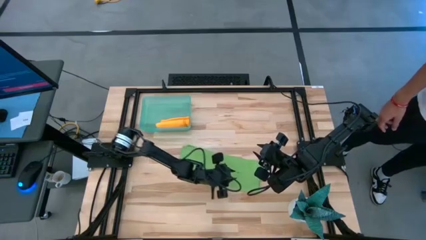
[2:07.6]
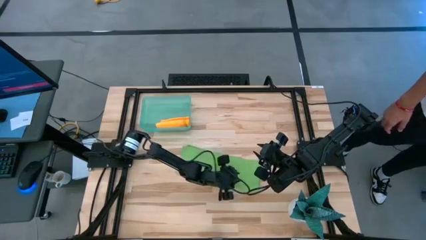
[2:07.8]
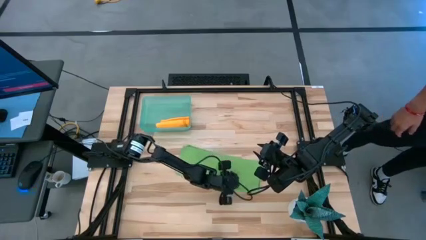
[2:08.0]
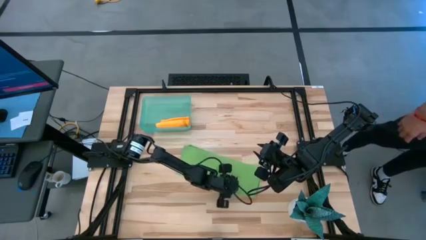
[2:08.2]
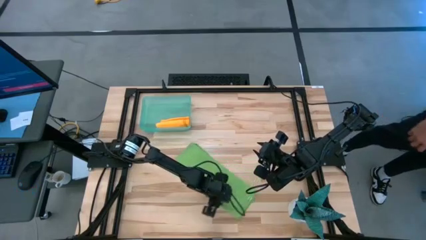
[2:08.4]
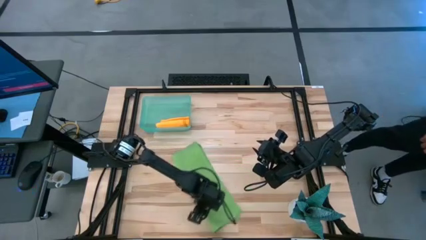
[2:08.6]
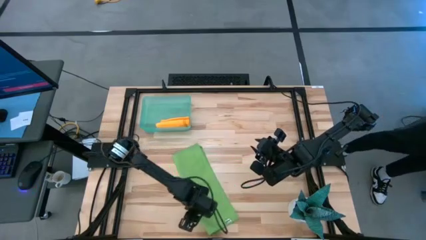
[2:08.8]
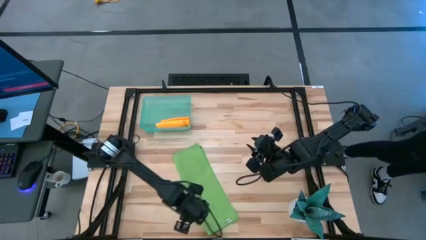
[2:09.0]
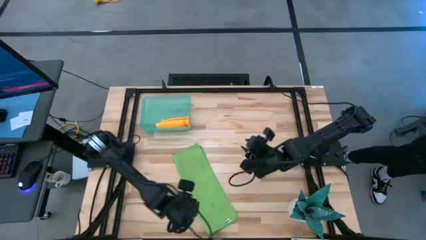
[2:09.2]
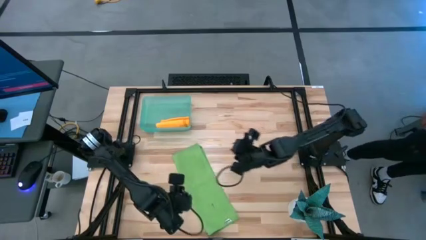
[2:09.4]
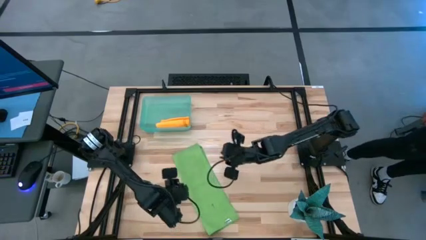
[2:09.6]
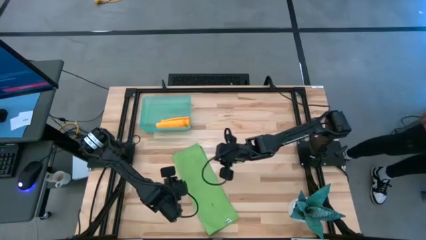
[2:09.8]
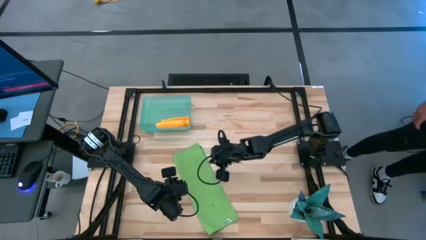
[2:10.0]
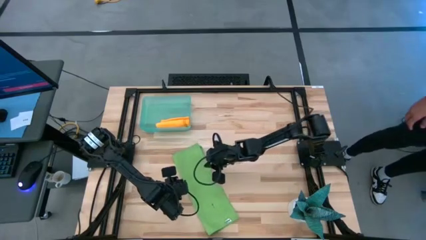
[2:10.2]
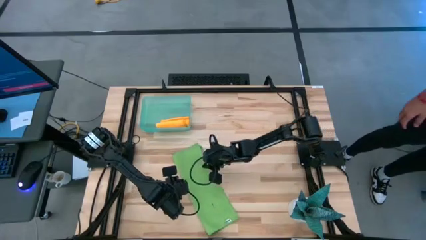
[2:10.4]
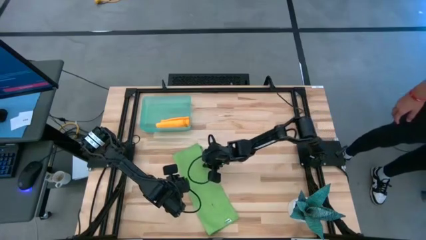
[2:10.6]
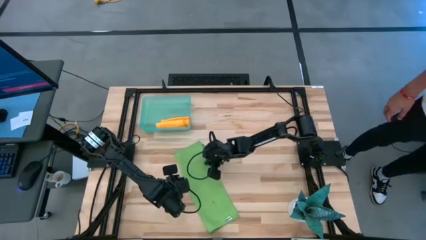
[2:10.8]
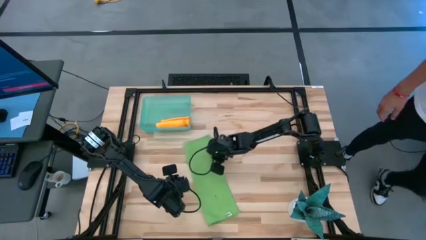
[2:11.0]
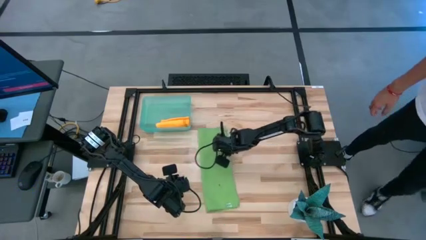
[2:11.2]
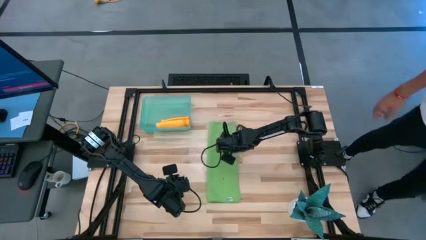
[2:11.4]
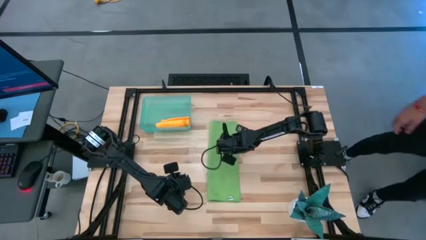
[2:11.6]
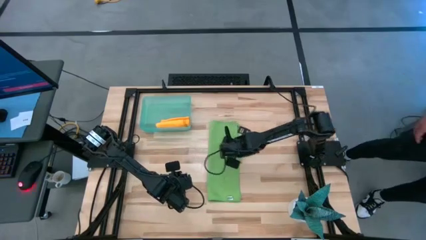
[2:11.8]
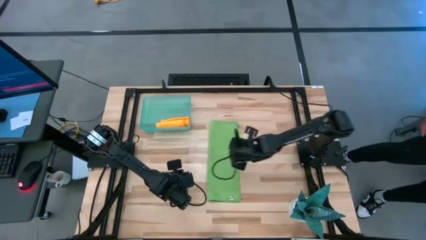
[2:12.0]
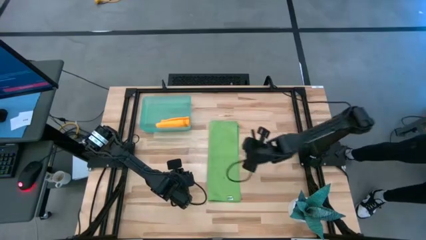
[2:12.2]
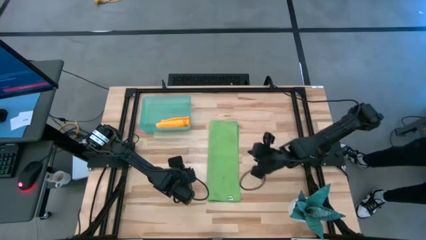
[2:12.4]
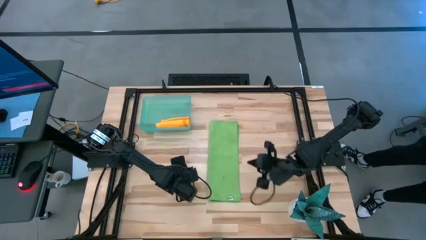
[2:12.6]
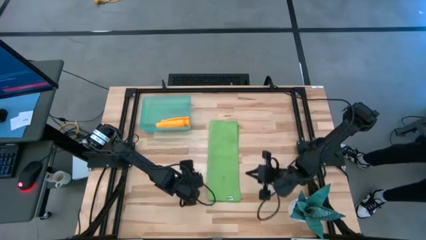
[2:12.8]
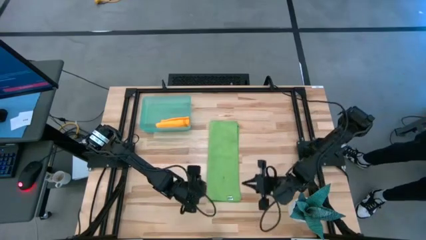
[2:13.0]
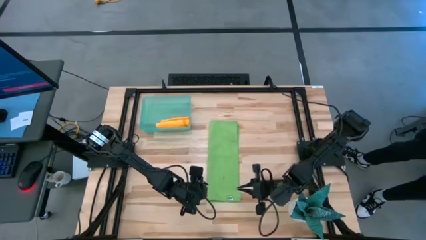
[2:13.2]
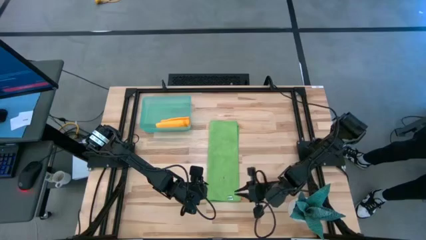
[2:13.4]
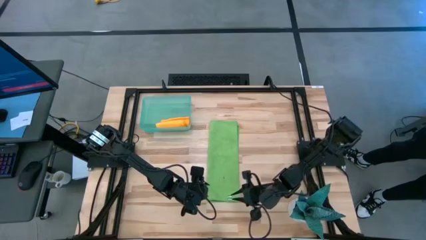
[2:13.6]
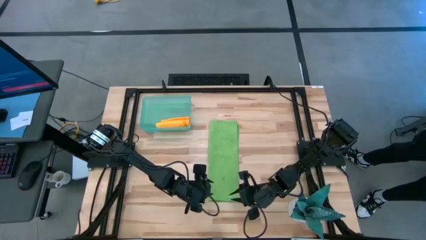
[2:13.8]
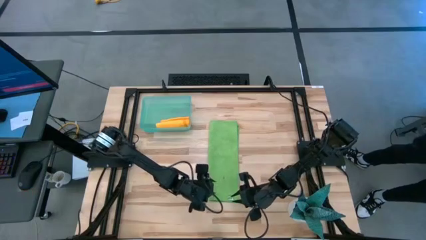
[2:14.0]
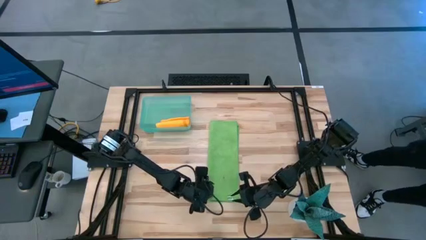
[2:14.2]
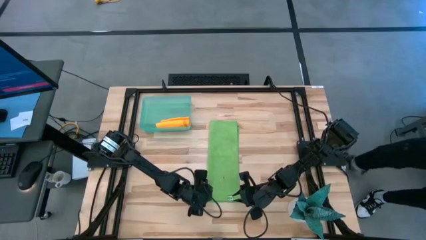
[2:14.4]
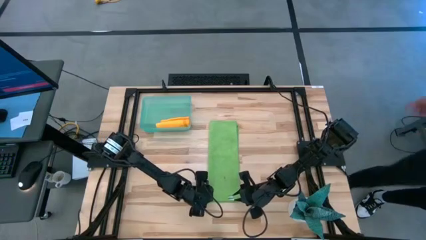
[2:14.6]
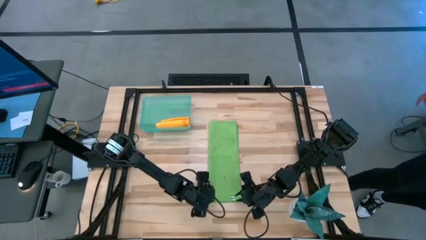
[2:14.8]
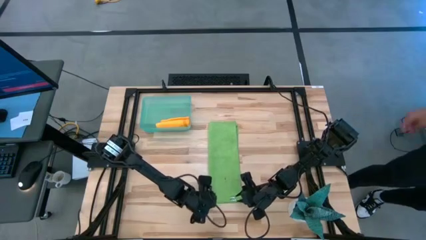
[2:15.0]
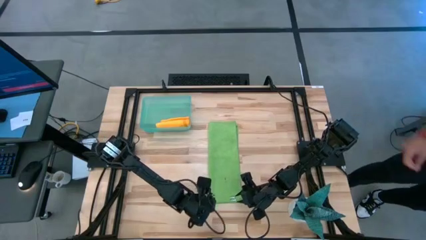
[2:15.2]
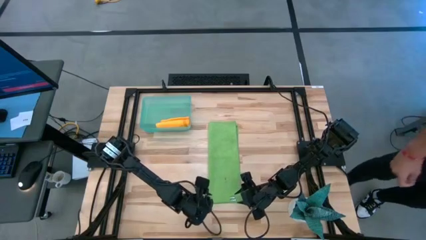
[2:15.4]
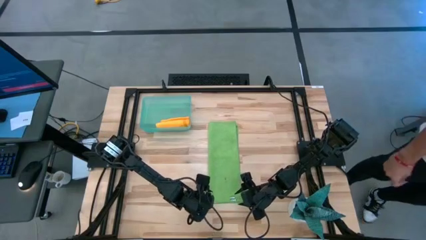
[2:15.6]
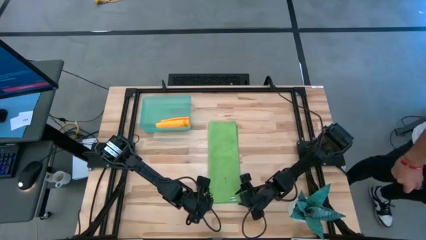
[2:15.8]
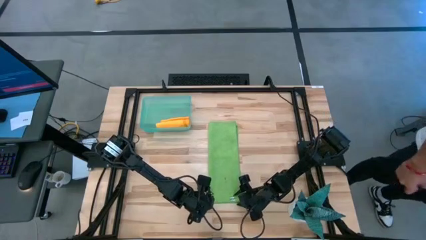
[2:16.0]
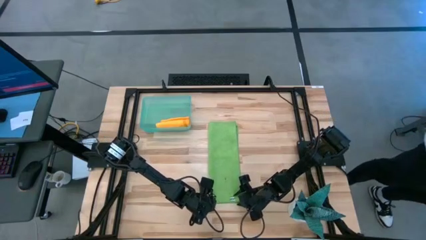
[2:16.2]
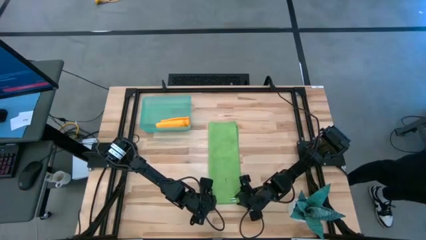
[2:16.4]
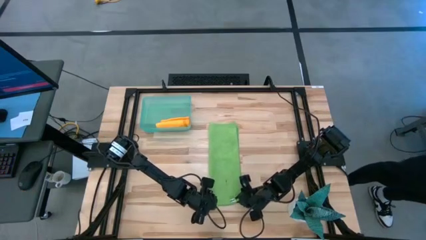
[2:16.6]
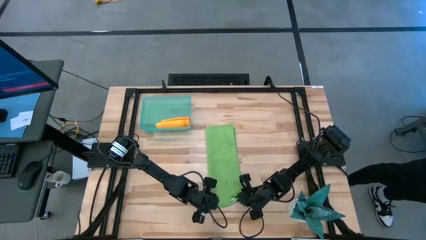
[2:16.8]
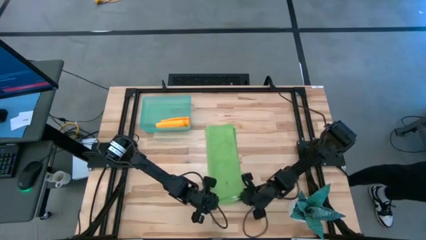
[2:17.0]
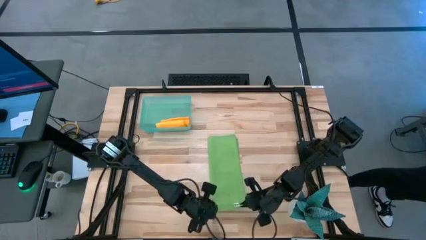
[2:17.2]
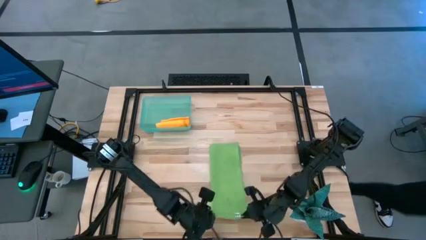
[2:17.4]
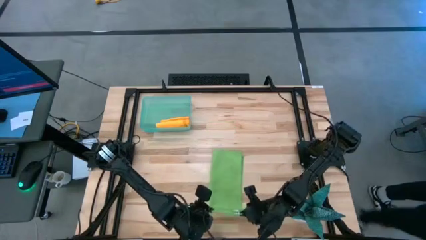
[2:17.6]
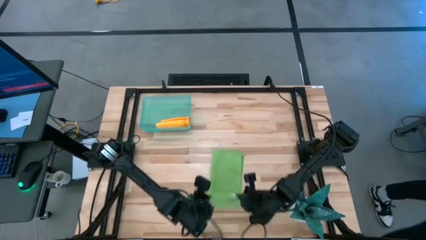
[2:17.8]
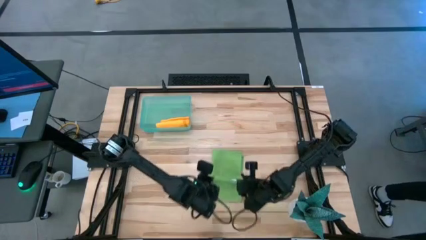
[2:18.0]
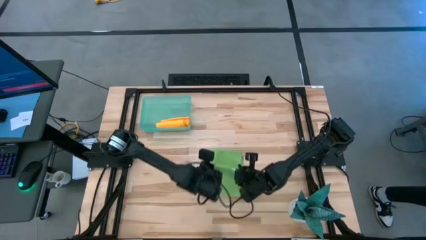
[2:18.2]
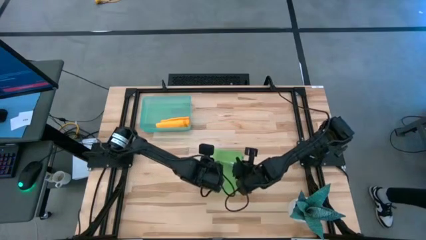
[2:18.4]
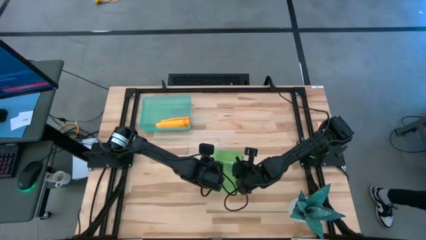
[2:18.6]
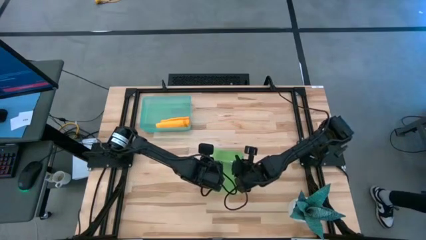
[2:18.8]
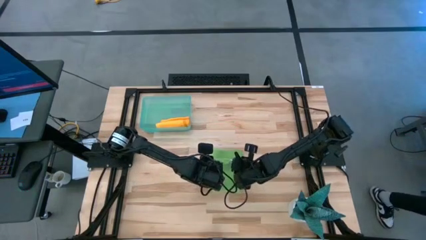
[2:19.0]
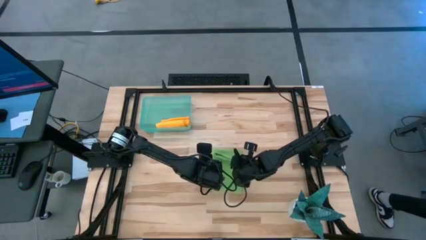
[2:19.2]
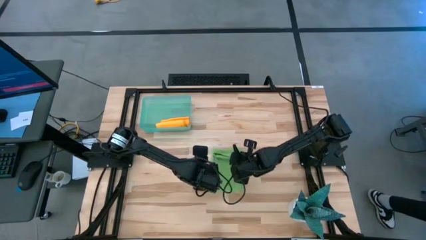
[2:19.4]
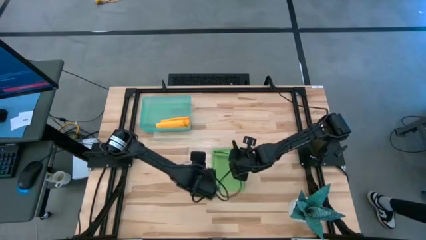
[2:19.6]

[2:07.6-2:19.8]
Task: Roll microfiber towels into tight, uniform cylinder then place into a basket
Fold the green towel

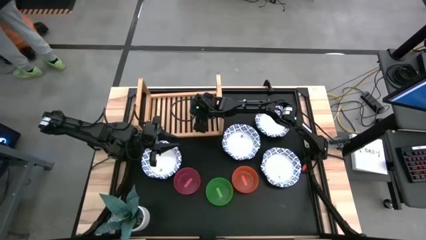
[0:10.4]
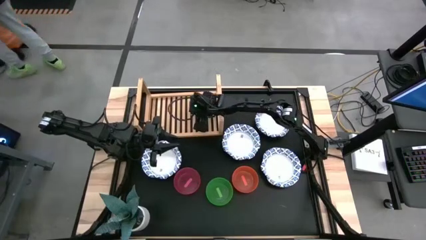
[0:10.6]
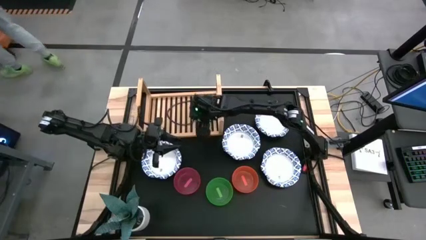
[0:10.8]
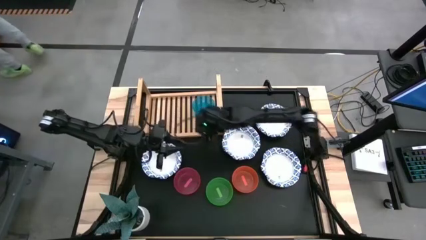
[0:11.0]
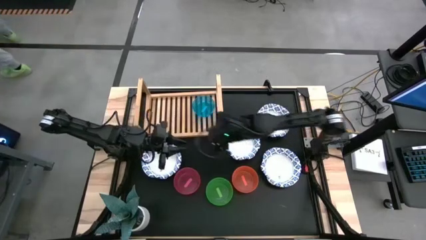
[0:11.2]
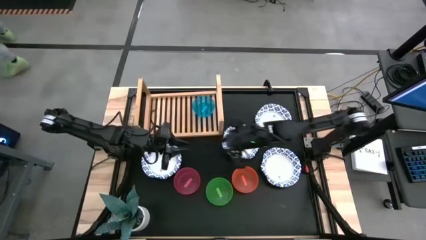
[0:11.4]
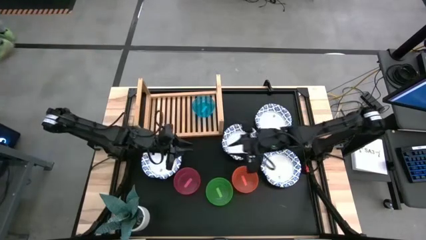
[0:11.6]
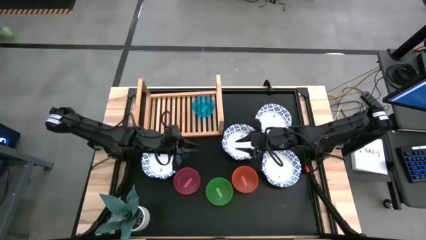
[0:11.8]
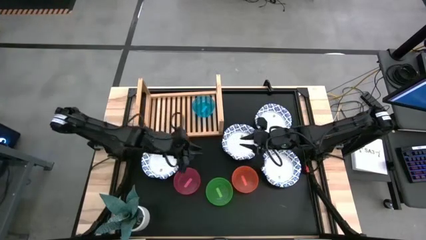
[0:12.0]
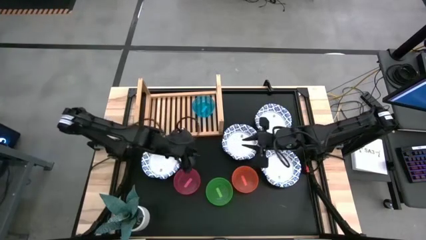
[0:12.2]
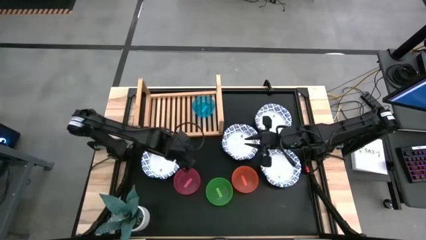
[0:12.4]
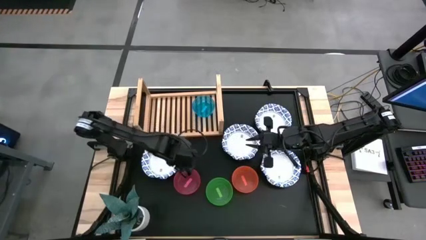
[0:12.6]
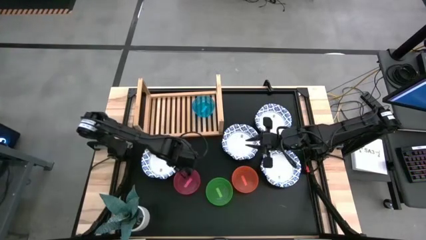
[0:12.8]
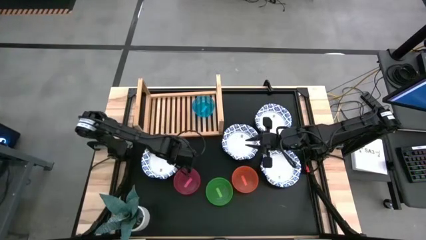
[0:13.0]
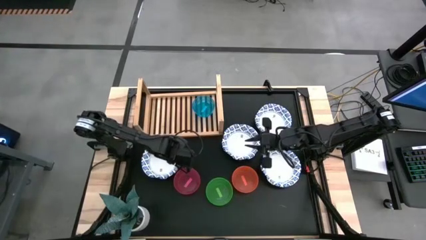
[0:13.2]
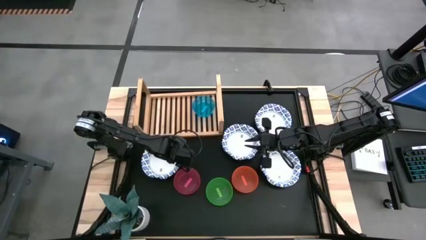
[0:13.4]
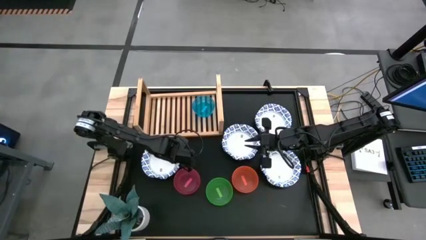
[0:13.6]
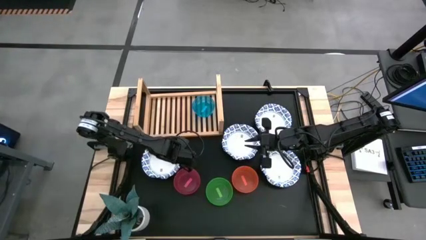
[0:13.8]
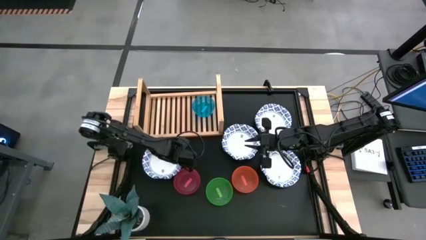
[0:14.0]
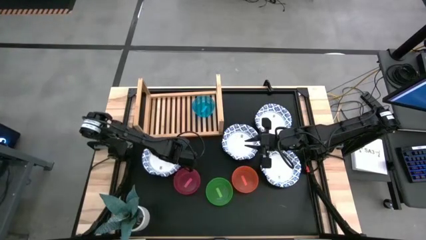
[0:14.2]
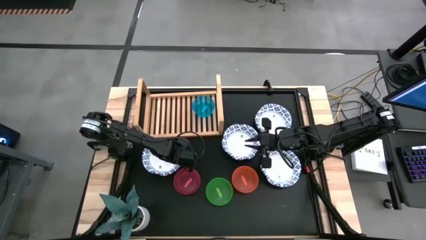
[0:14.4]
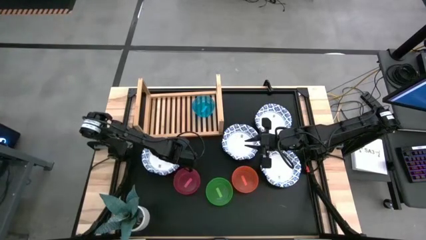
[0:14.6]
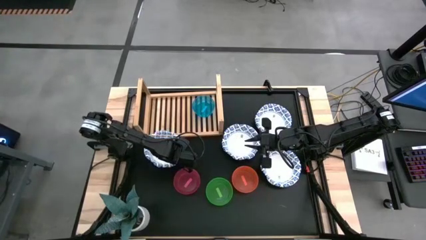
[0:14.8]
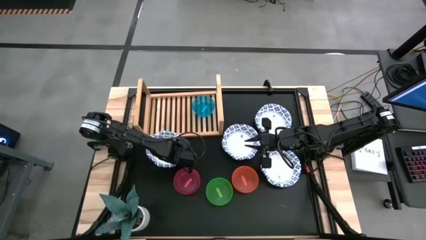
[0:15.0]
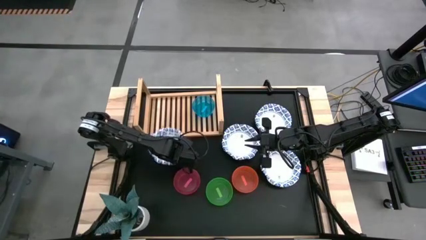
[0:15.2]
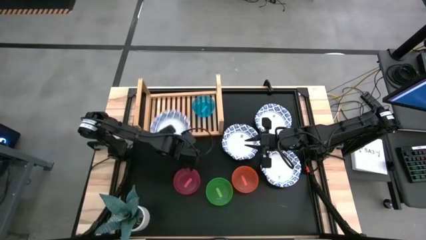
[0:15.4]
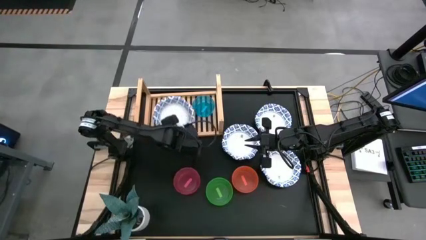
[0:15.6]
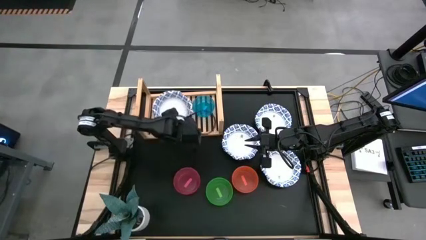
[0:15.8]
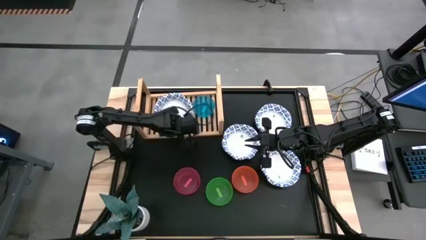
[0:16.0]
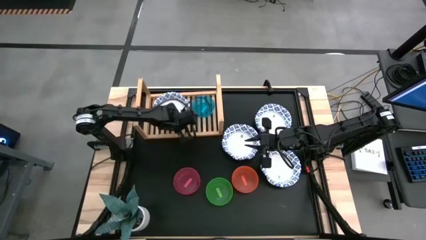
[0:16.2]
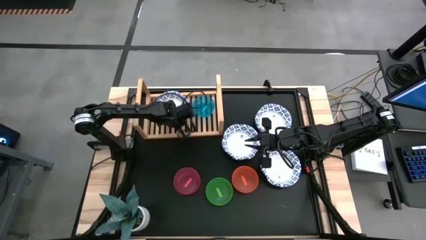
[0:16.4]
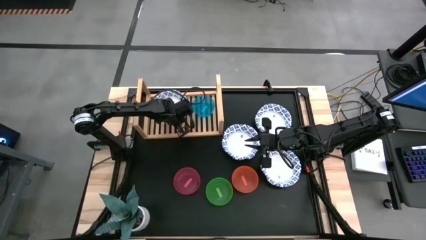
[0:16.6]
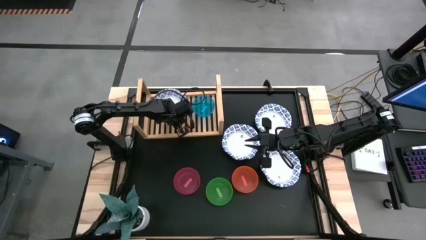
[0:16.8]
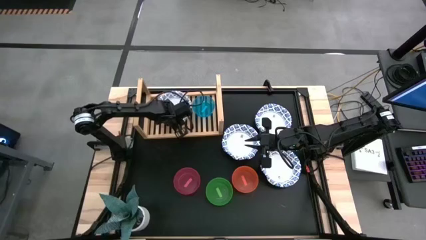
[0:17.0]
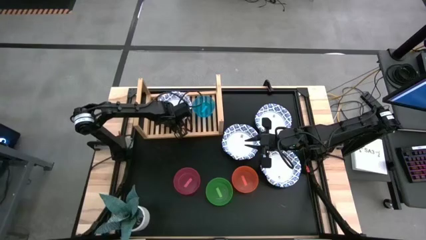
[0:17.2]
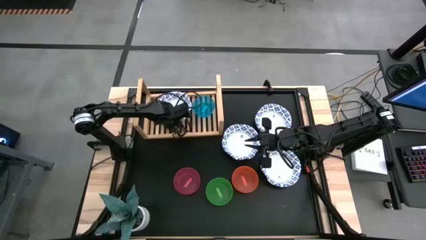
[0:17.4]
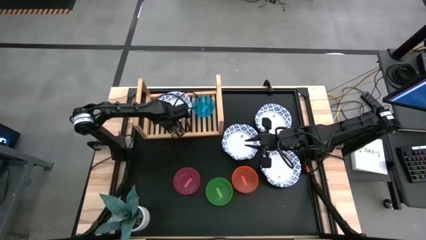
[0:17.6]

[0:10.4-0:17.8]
Task: Place and stack bowls onto a shelf
Put the left white patterned bowl on the shelf
